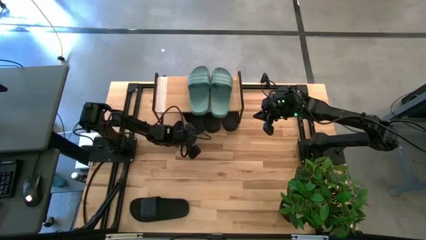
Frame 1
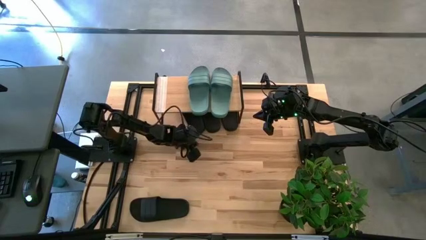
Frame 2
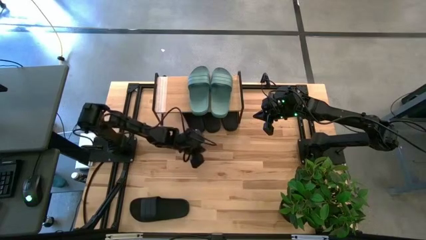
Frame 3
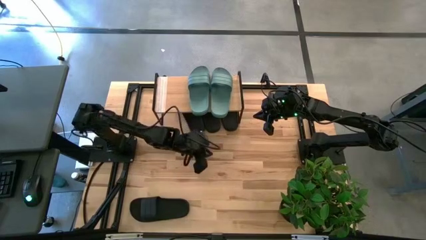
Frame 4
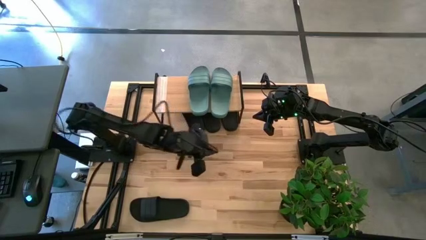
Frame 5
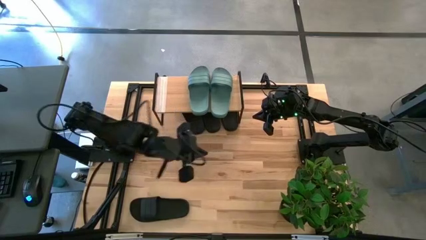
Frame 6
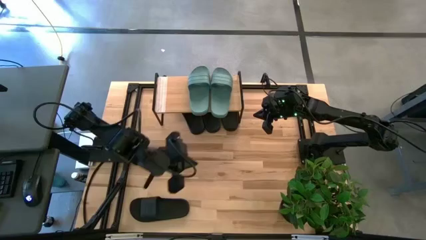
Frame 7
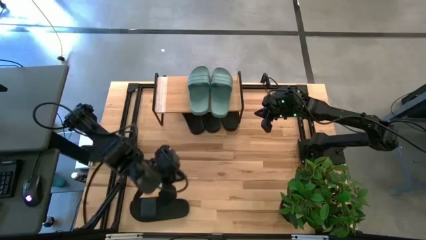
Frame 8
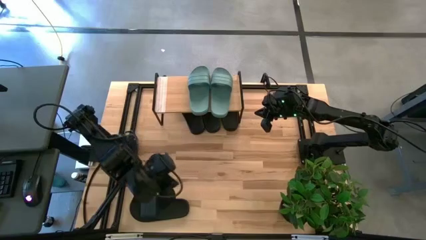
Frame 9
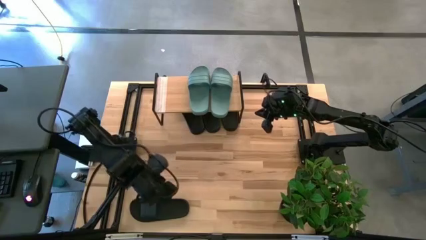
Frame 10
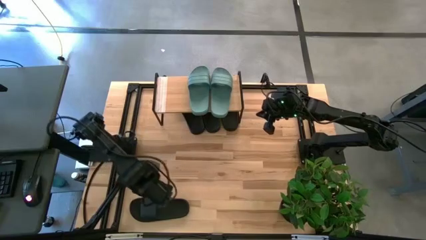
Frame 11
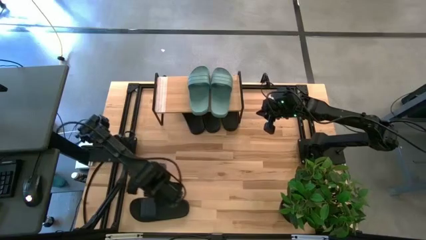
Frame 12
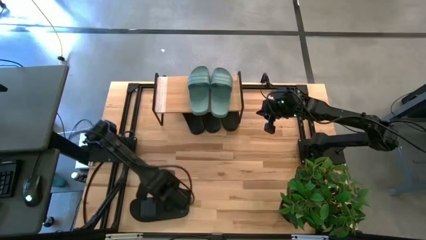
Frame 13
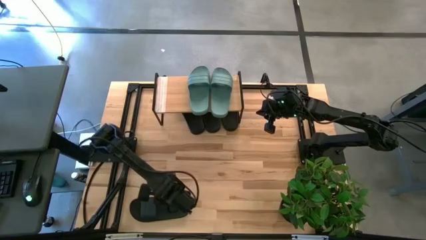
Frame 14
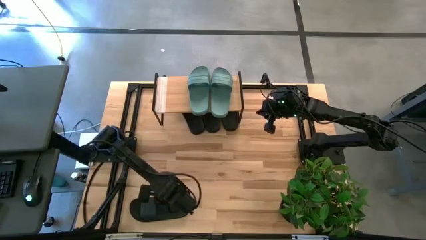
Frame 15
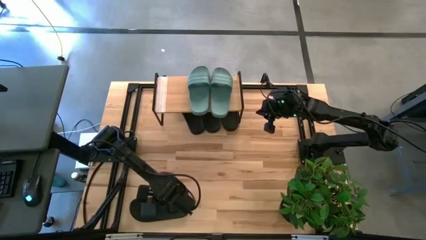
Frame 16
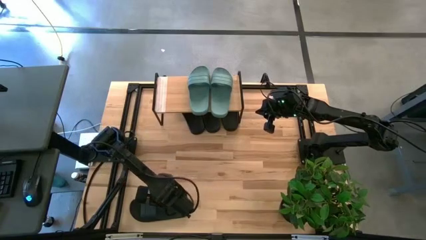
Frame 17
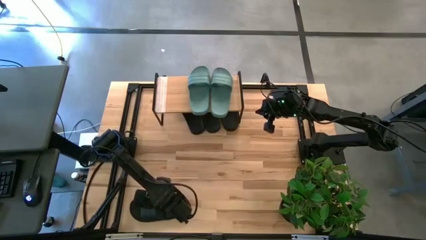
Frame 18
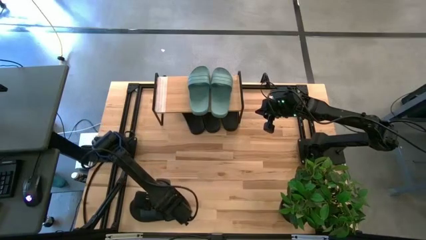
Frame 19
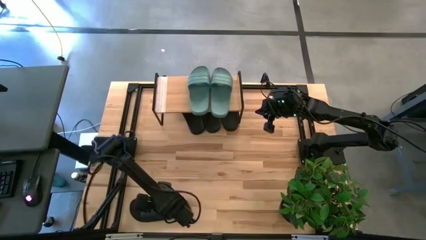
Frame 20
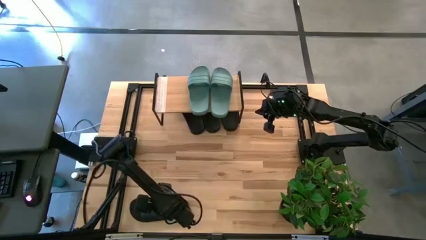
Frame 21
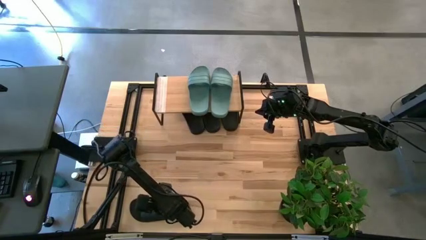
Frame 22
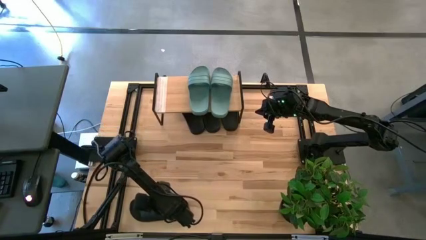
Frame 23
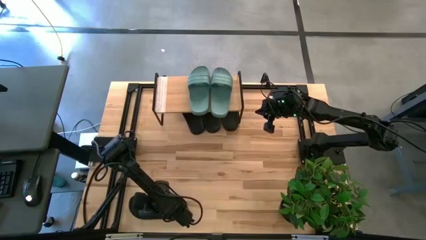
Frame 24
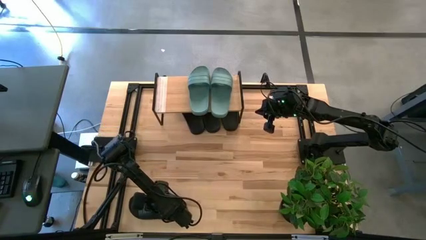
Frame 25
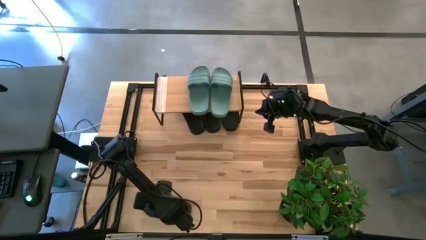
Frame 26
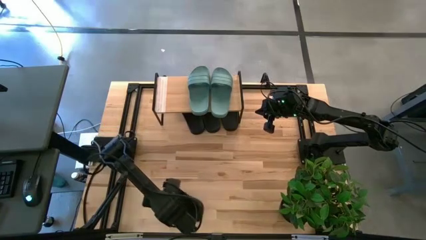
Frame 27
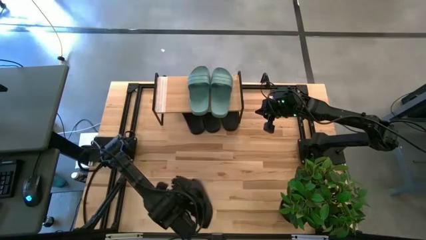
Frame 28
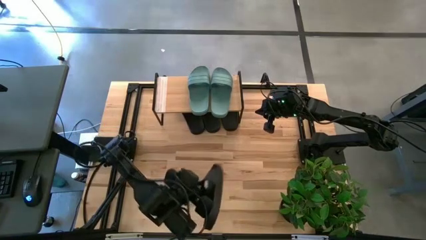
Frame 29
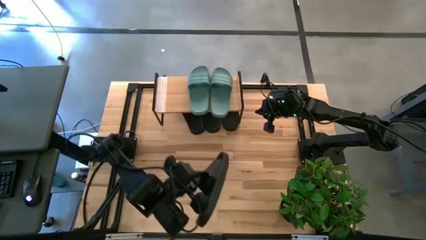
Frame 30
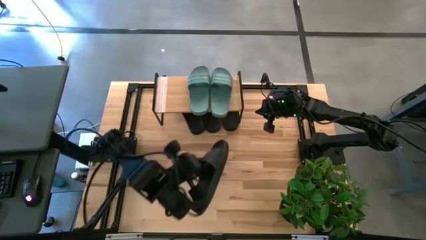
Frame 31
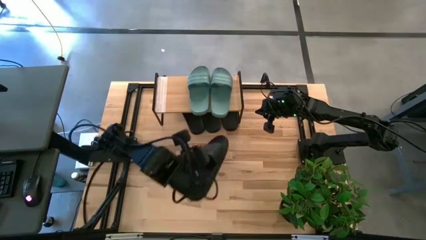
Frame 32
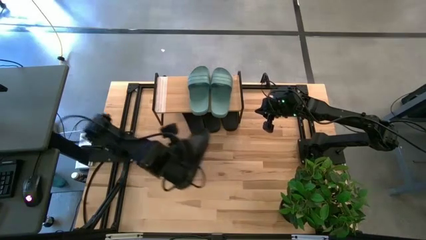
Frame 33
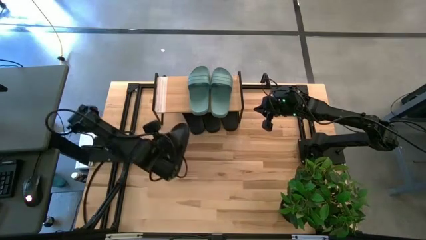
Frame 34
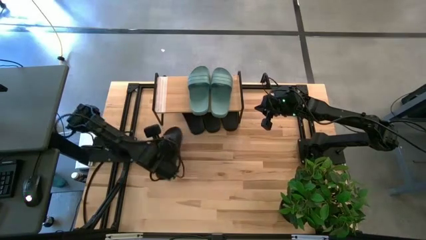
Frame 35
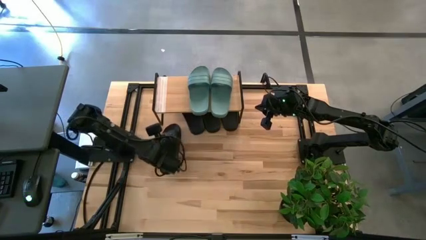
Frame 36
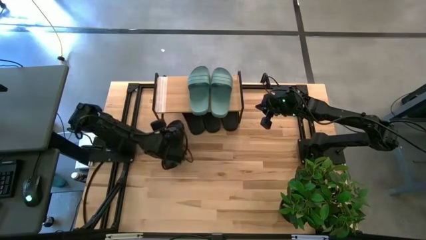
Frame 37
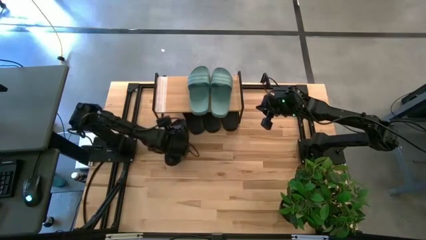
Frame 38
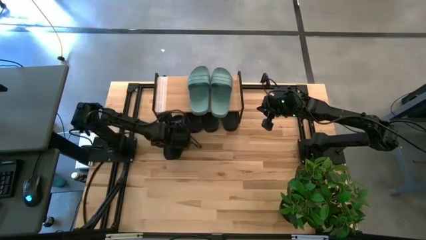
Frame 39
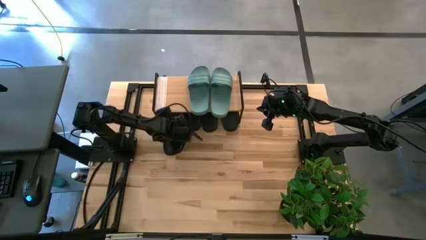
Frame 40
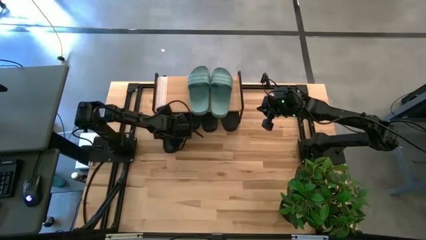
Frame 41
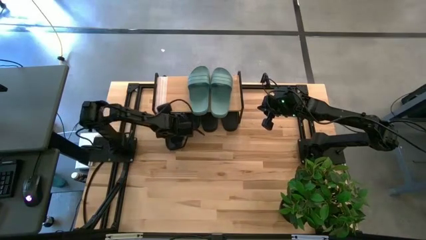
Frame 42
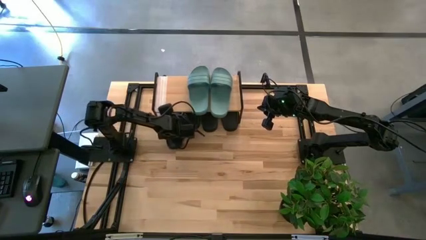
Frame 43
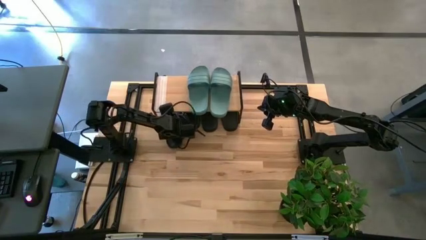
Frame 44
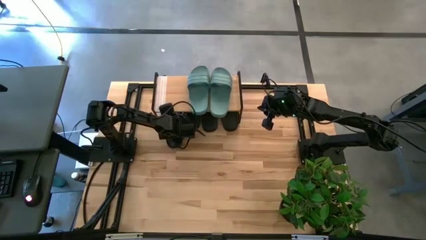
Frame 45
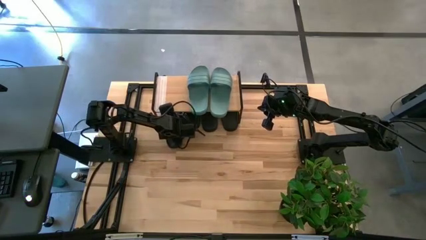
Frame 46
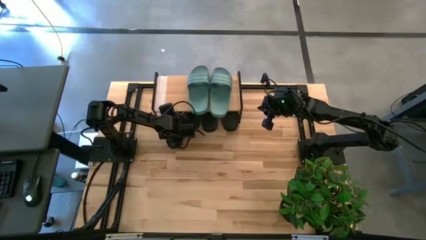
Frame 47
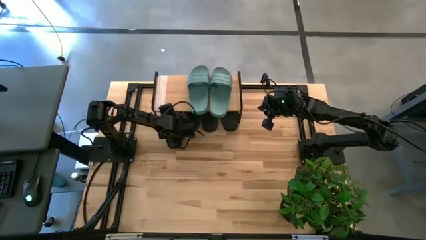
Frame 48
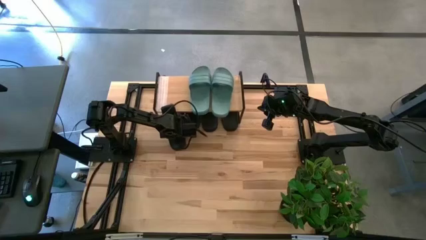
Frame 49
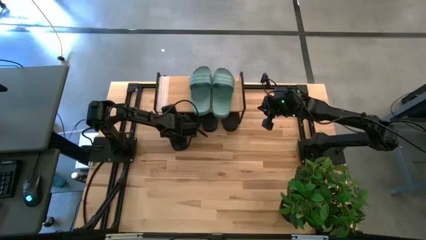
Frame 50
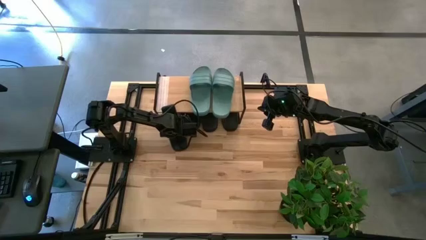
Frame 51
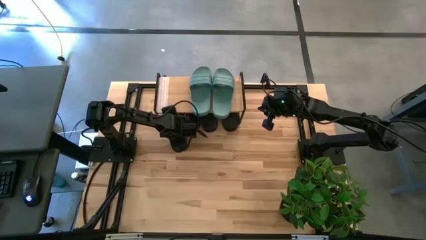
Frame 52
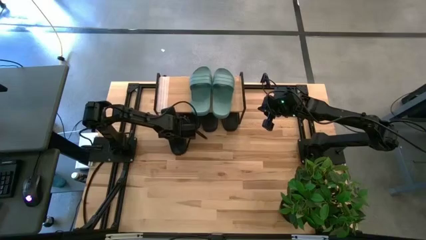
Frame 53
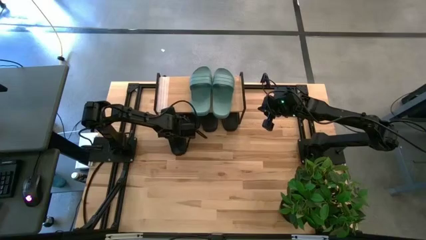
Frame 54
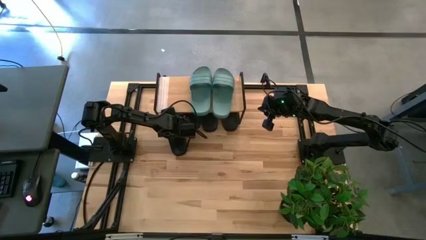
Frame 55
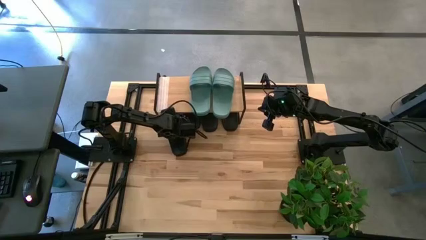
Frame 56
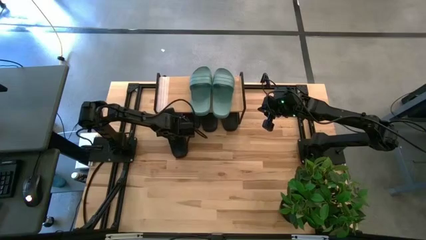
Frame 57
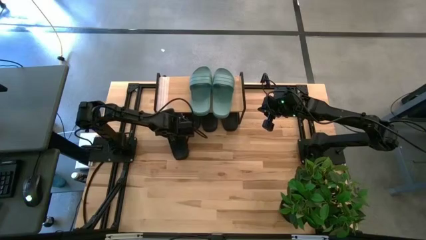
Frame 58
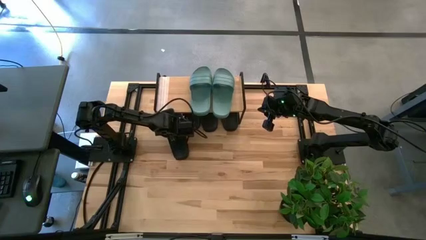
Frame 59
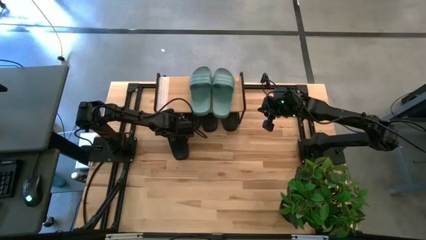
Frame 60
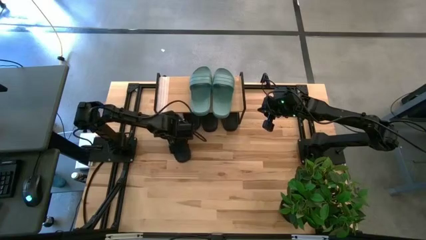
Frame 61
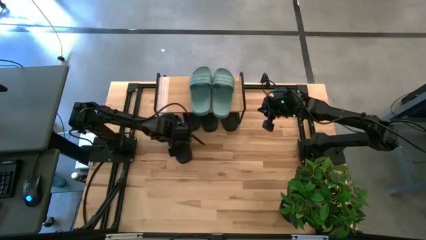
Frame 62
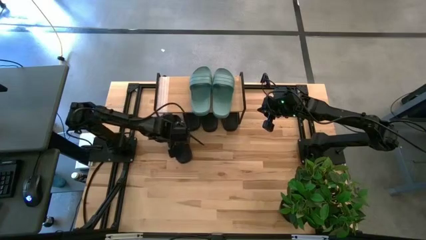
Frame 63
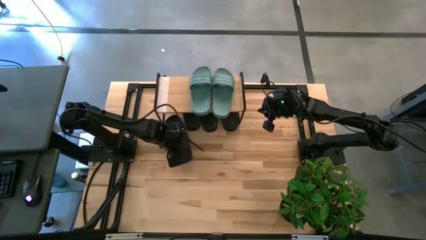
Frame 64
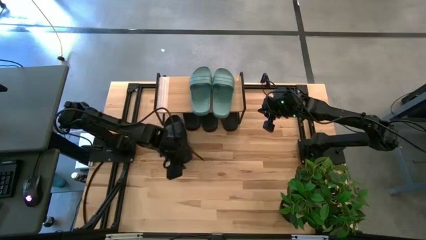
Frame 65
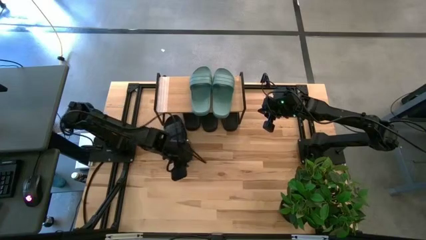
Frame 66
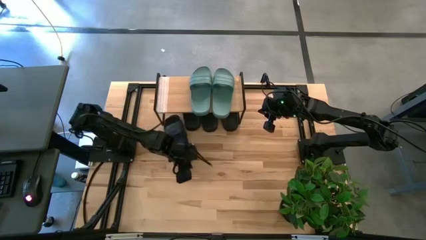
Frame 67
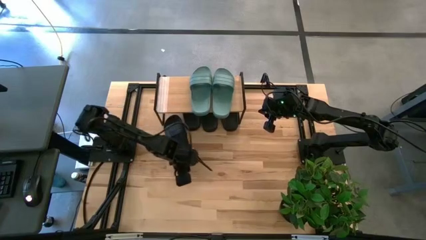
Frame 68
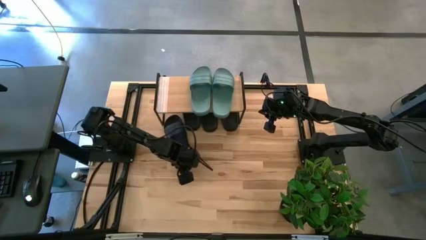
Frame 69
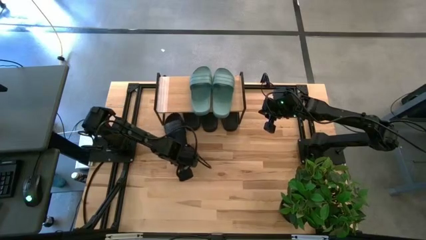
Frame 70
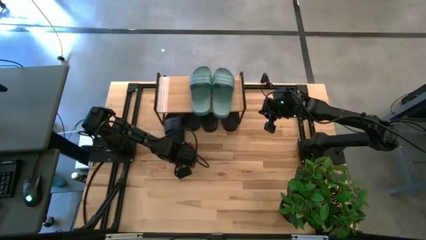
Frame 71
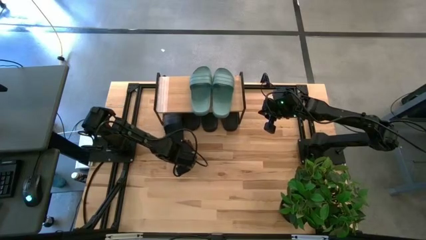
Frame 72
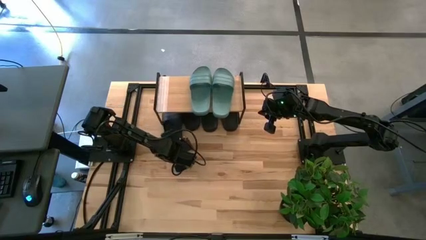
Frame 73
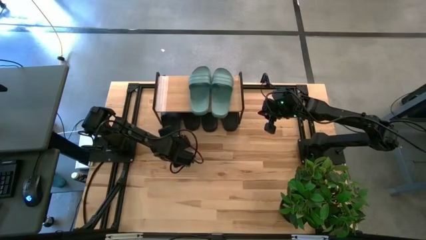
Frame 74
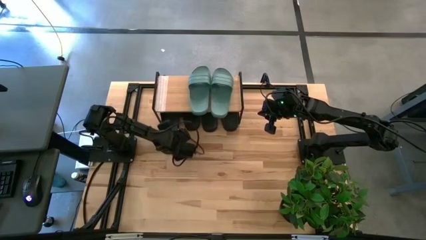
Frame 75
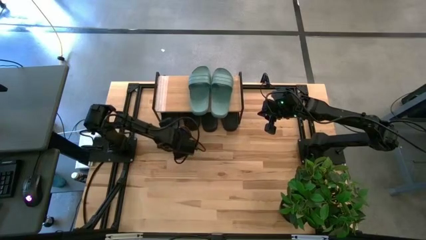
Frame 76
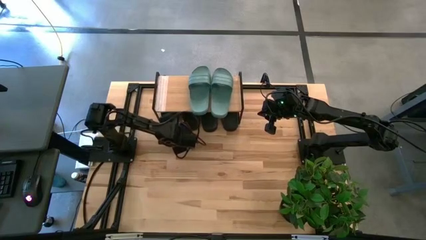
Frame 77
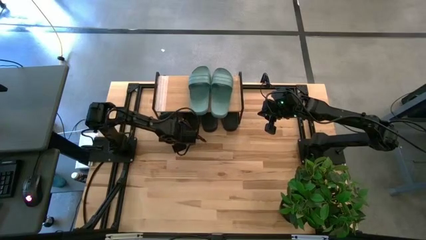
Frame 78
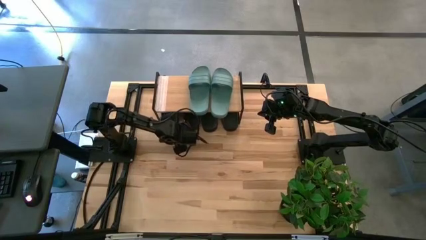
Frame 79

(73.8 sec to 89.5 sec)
Task: Pick and place slides into the shelf
Put the black slide under the shelf
